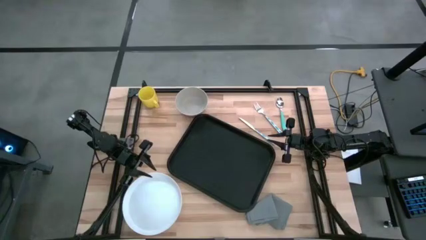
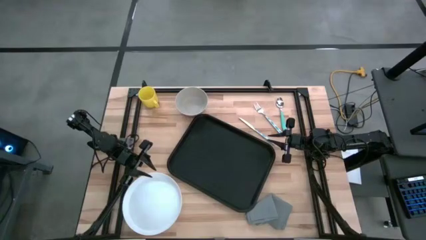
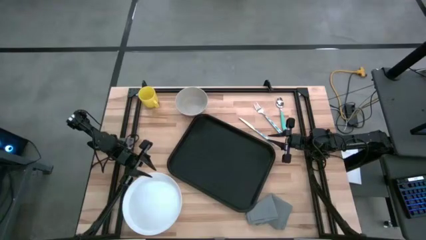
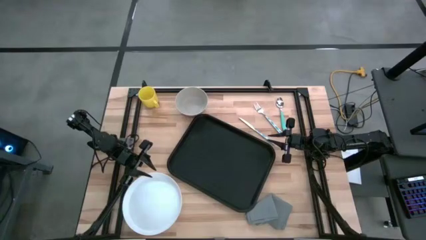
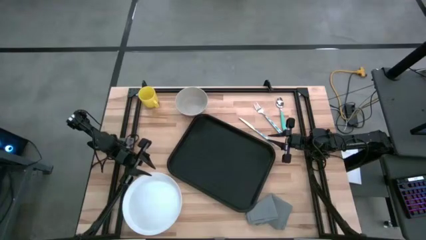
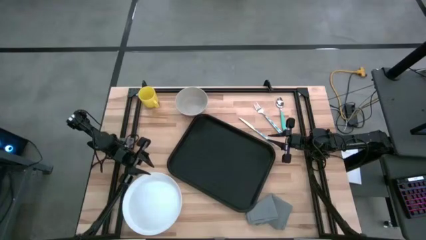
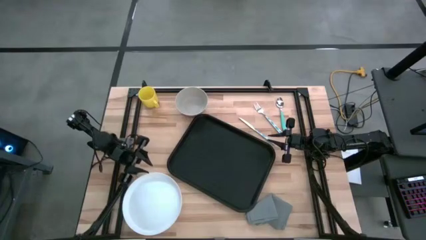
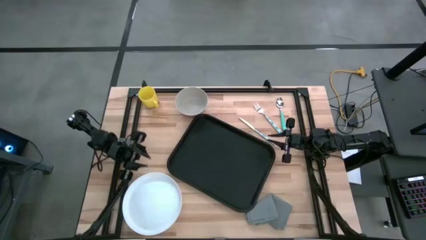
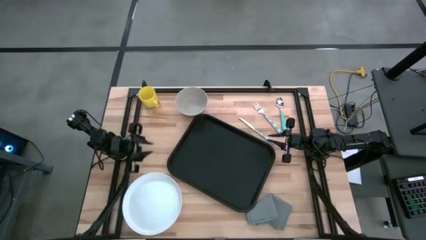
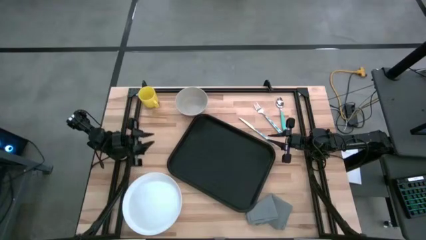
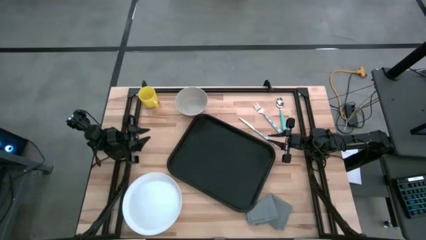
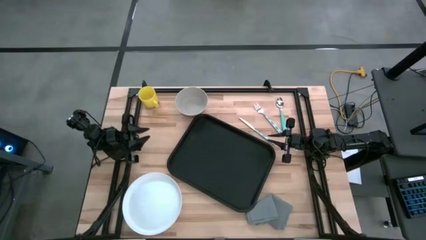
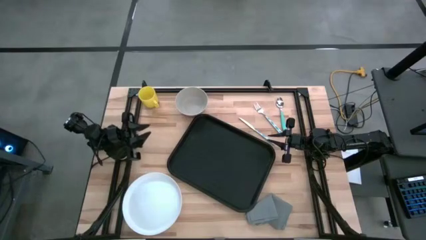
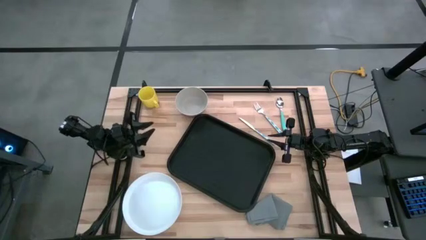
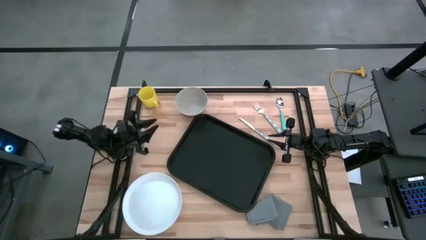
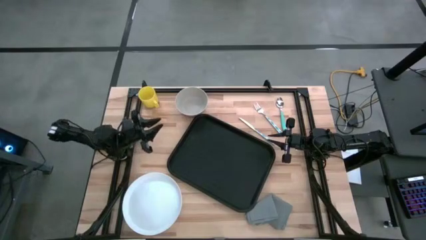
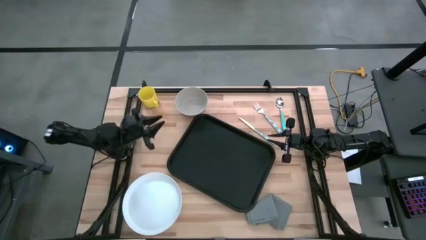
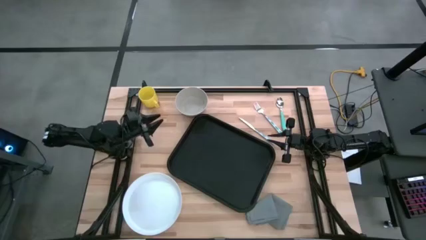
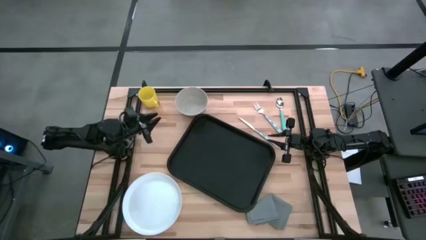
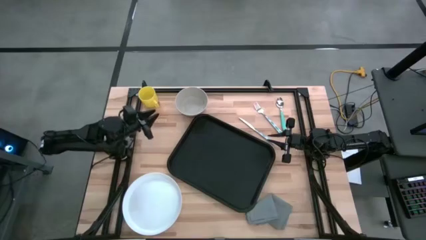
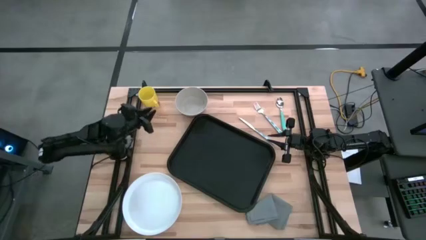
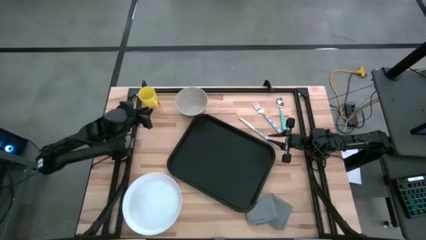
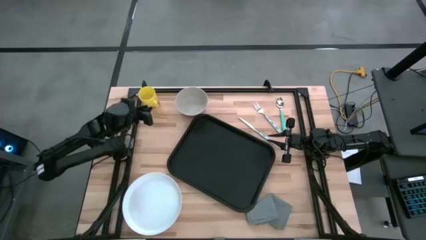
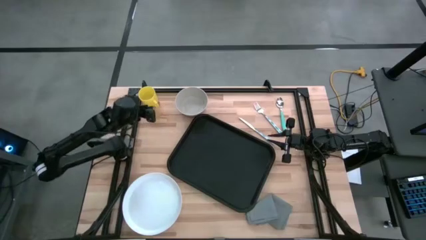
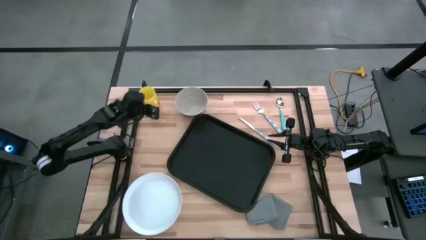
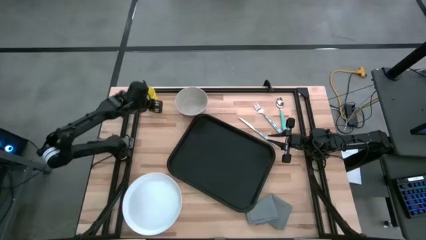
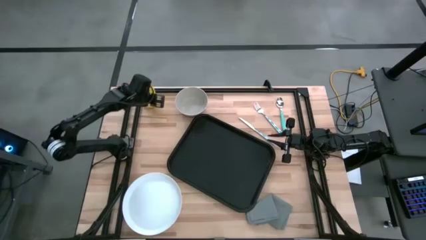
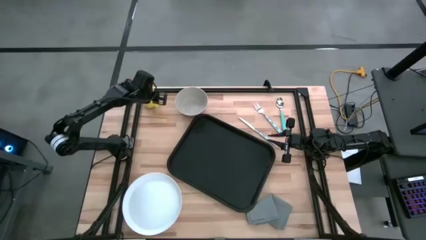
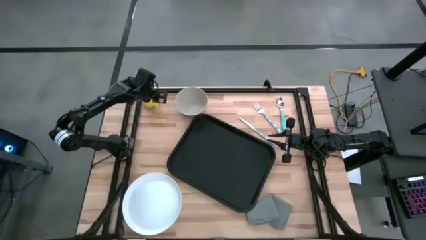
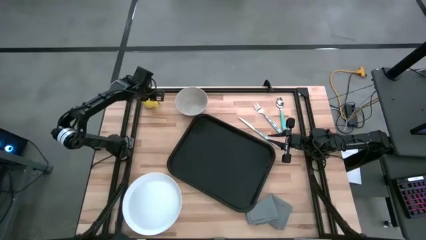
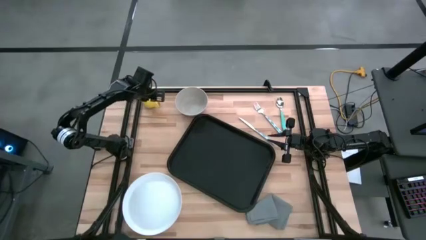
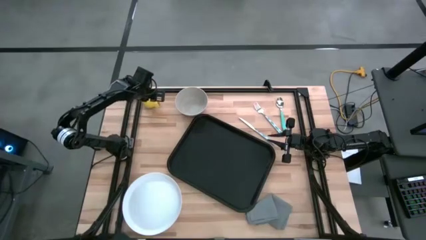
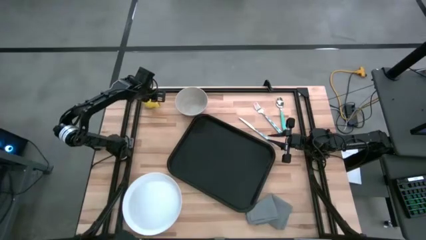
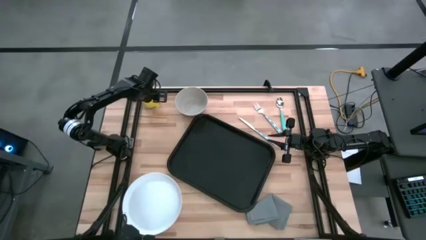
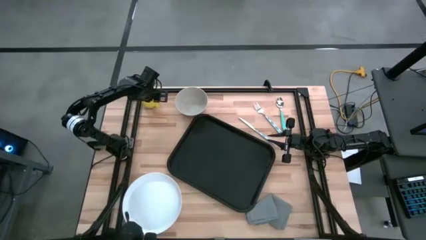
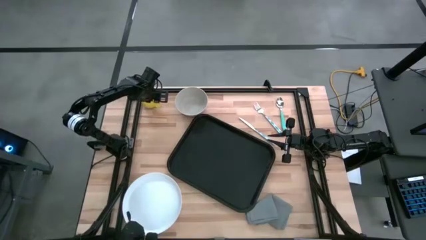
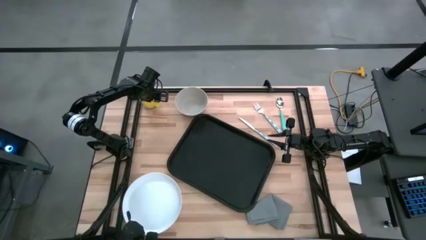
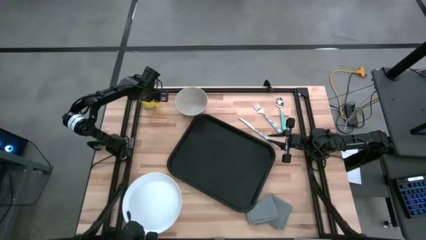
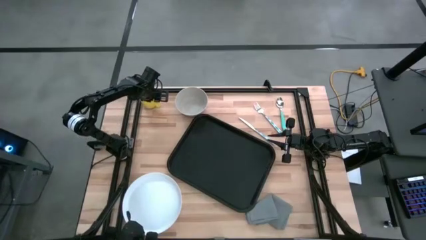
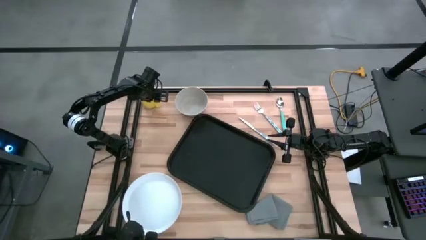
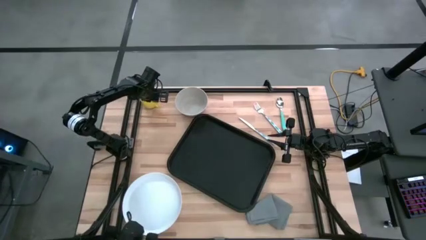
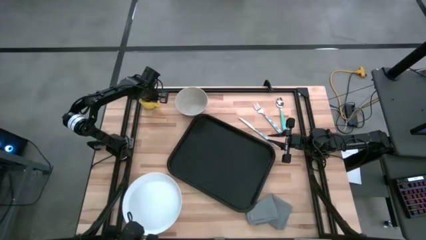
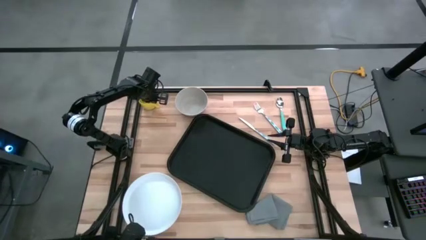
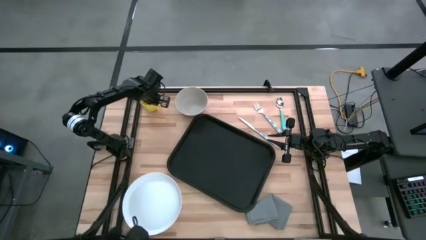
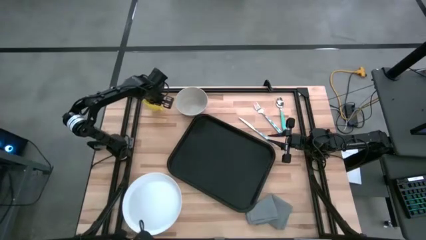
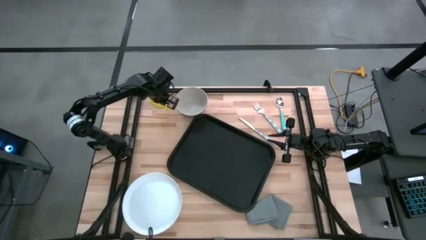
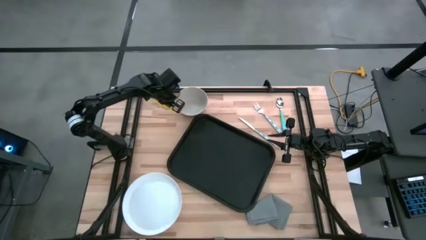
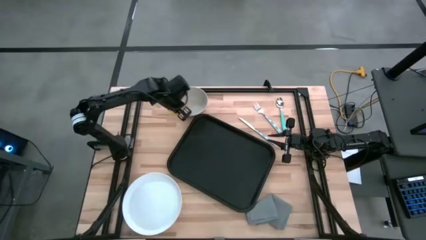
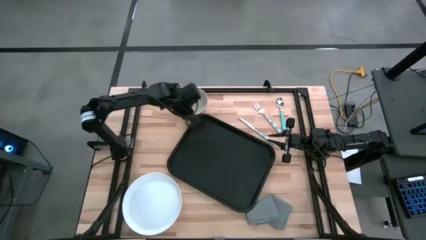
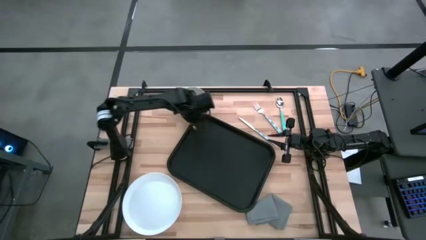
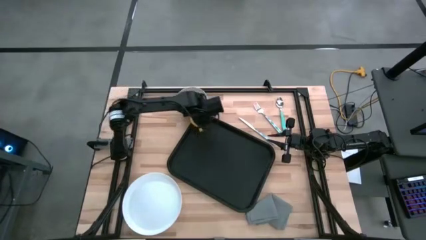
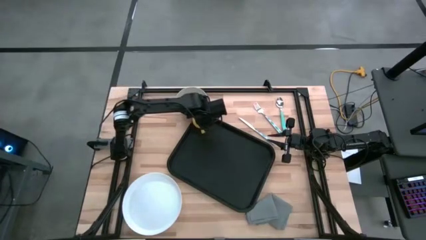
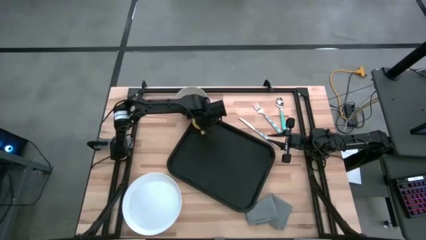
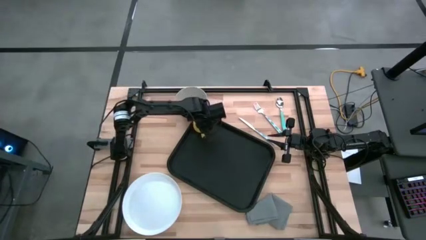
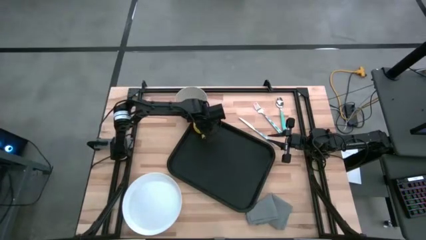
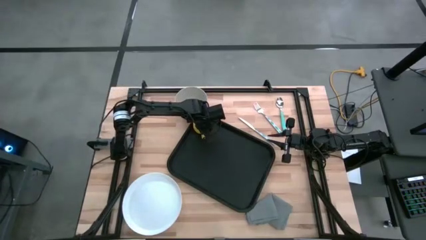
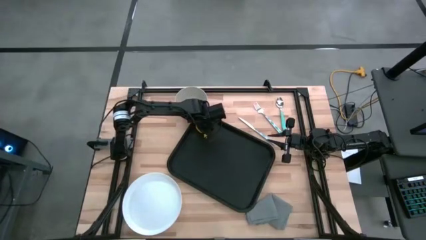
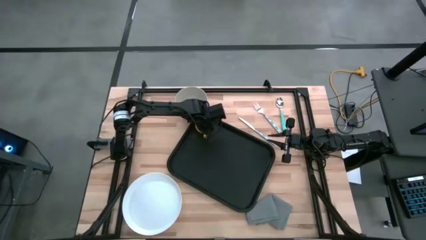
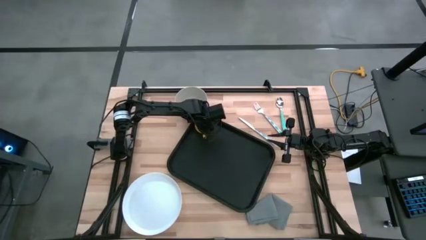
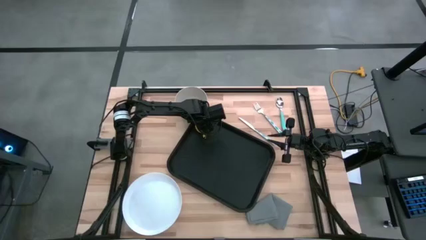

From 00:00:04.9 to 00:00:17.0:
Task: Set up tray
Put the yellow mug on the top left of the black serving tray
